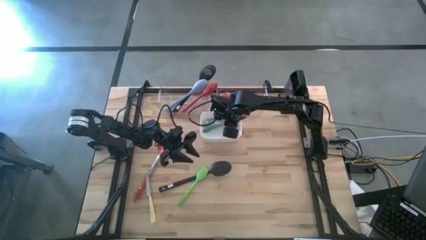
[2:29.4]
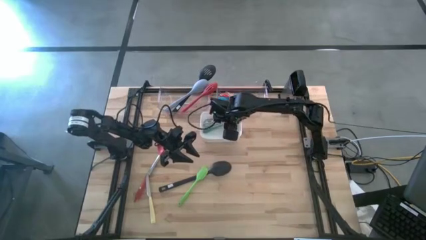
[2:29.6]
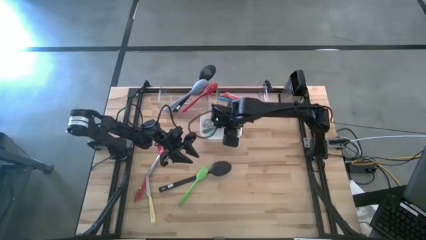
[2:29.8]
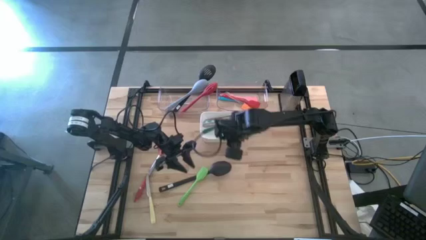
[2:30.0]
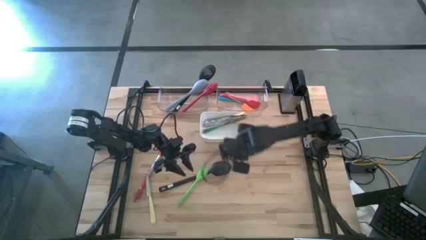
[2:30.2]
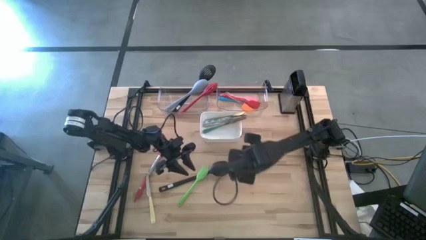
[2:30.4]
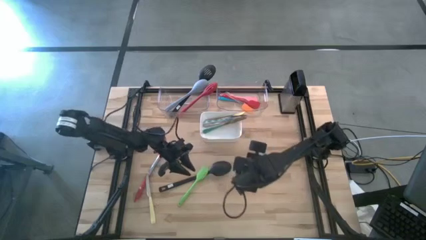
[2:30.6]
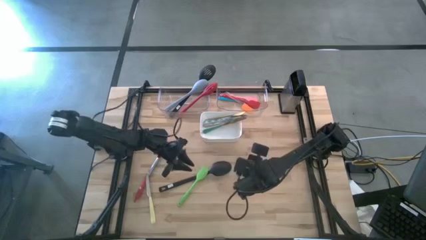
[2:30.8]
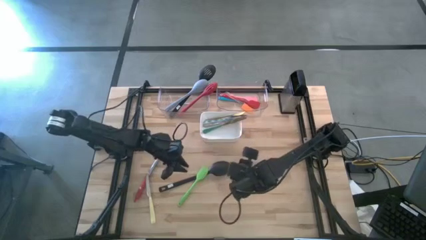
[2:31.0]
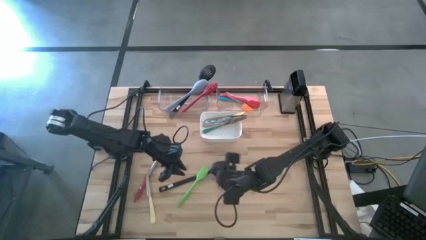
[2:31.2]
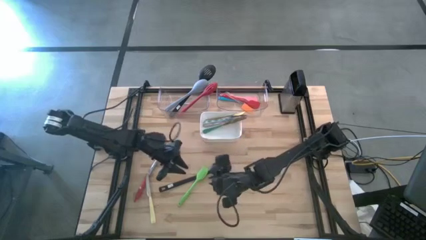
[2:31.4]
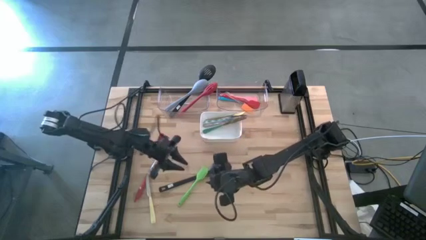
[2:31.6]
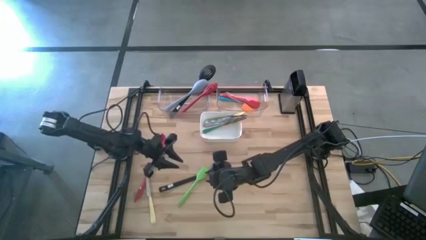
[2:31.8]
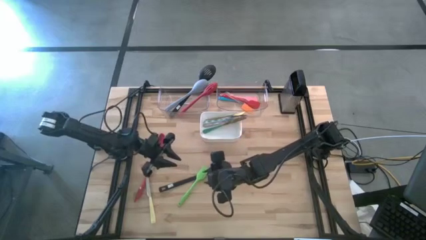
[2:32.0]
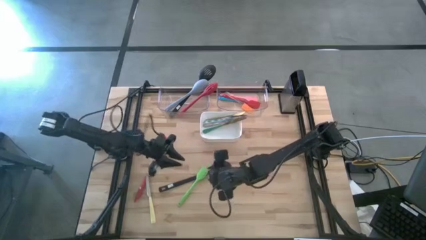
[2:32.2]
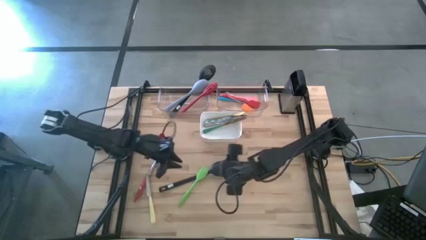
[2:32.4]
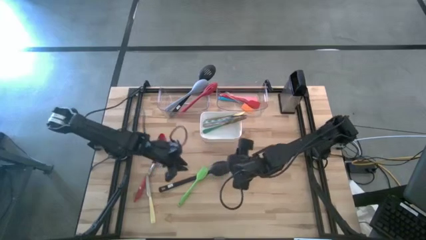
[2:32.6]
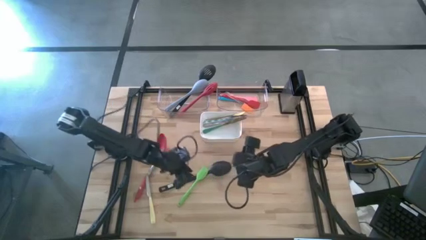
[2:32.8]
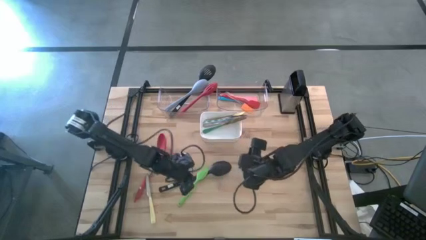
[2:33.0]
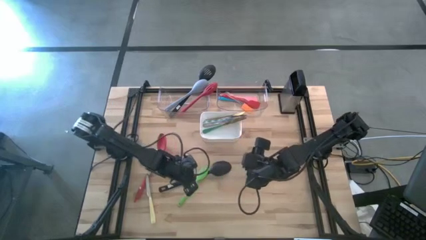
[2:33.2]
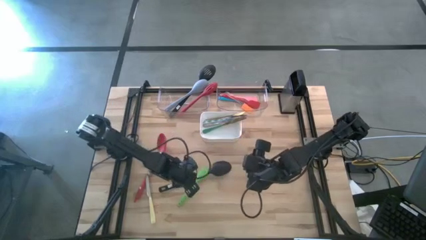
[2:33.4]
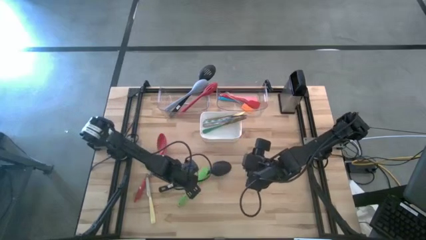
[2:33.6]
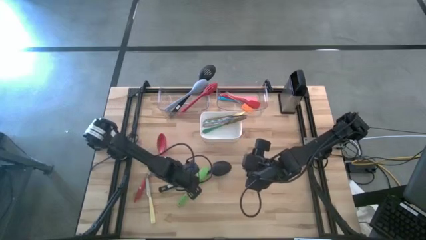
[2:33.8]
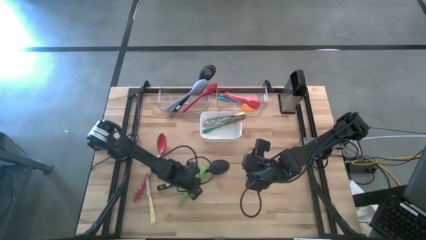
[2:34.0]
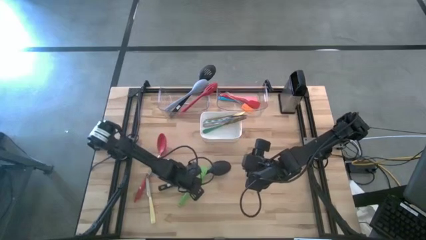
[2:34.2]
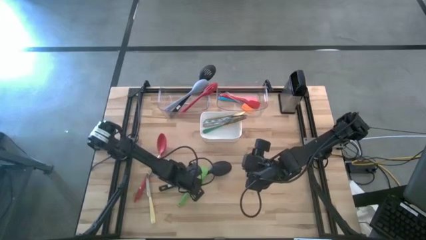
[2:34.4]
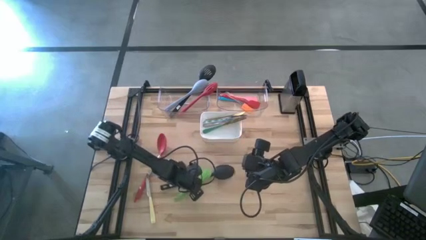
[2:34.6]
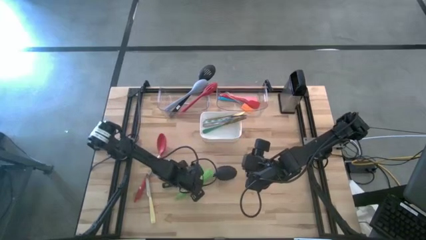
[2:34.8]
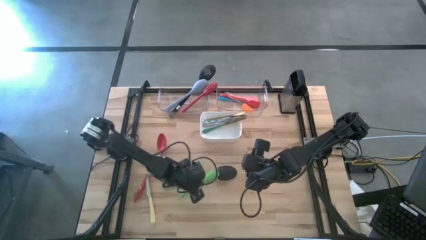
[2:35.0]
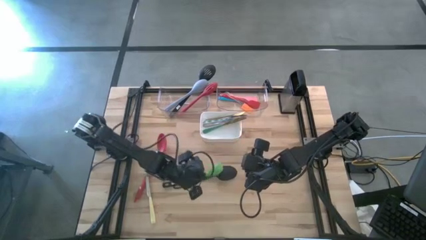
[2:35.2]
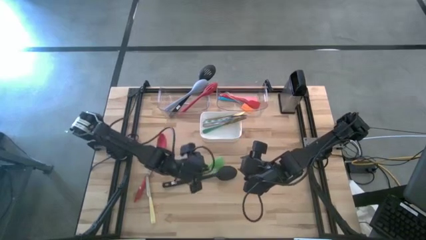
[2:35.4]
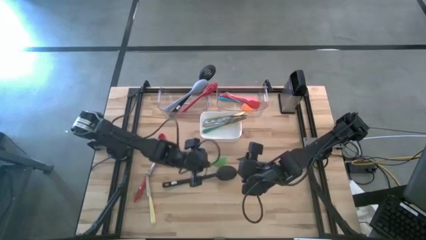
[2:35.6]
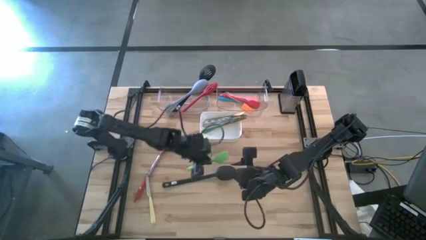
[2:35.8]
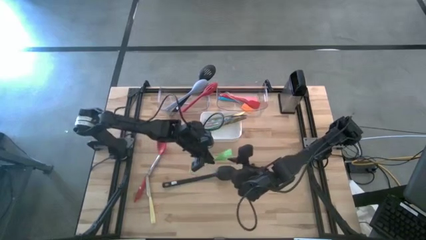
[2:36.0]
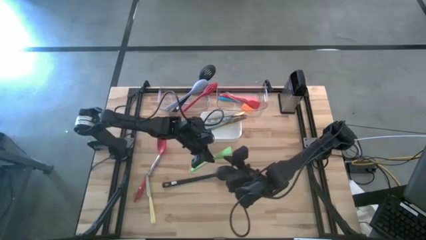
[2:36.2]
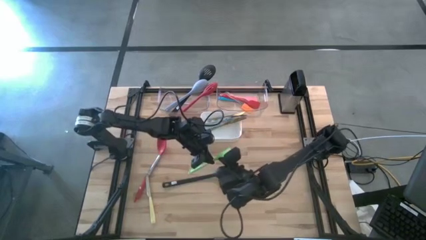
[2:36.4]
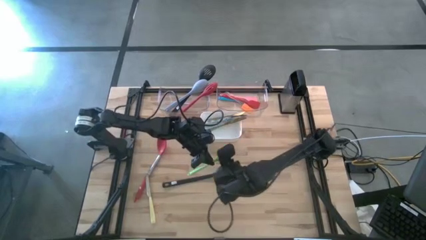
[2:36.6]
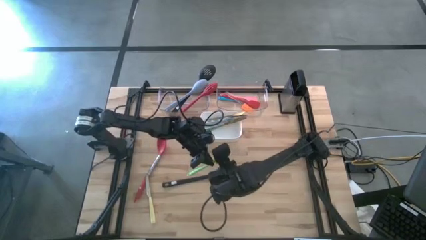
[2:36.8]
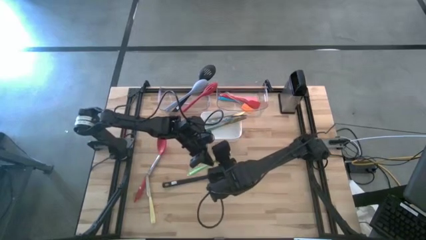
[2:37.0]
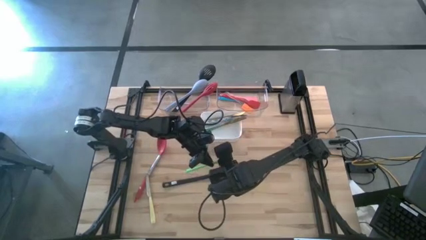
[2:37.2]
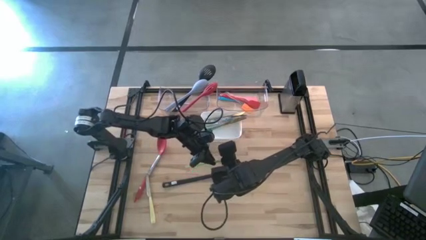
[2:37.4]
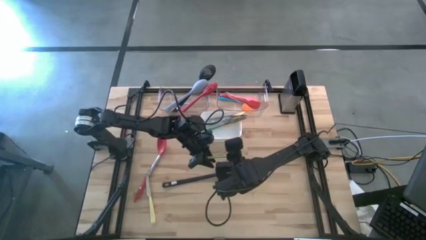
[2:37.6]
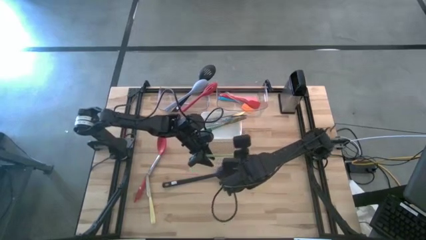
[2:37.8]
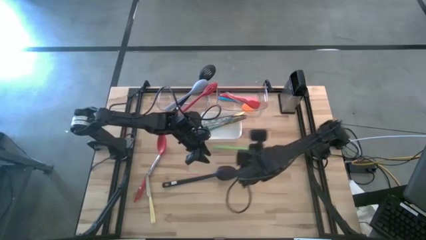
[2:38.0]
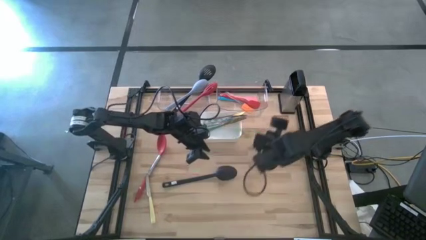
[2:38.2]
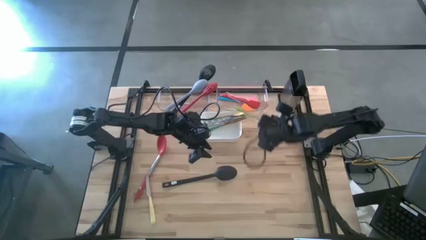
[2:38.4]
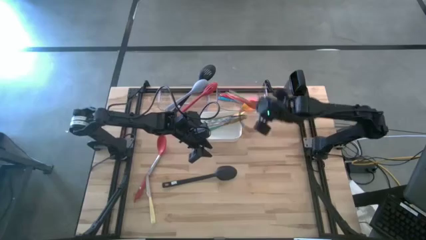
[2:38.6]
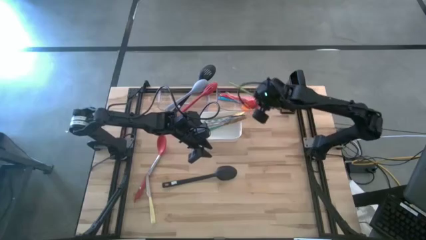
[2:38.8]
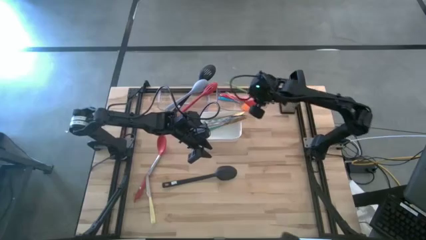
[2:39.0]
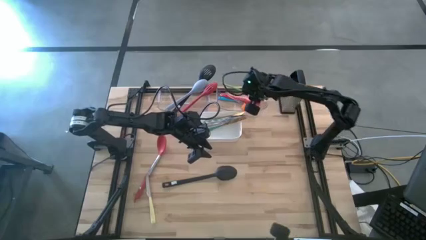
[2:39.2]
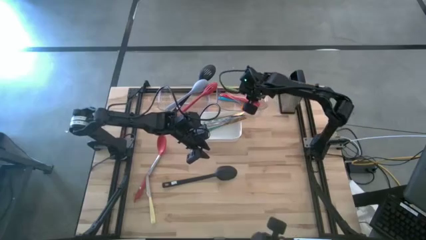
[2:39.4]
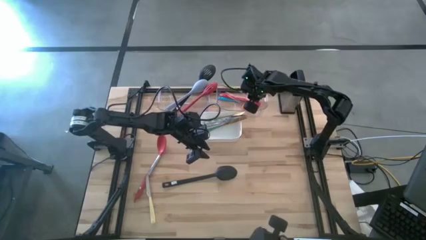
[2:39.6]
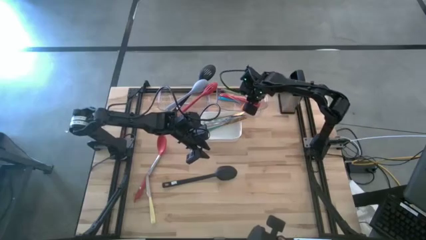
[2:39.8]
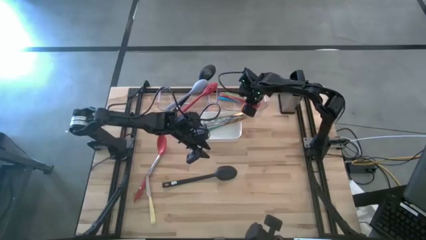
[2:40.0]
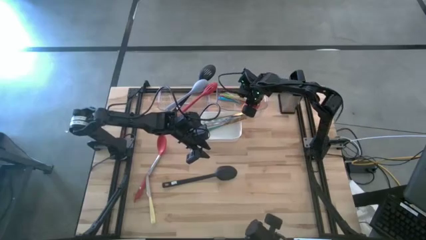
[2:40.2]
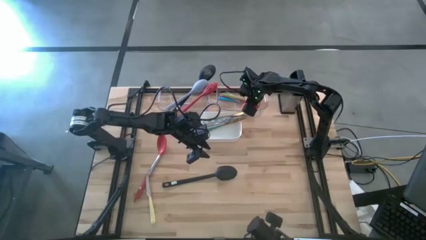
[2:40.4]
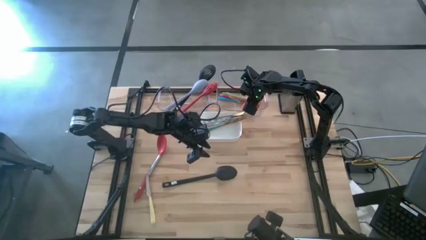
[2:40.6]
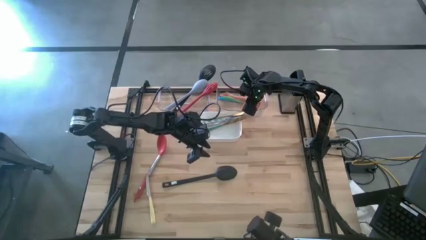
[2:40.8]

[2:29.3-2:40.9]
Task: Pick & Place Kitchen Items
Put the green spatula into the right transparent bin

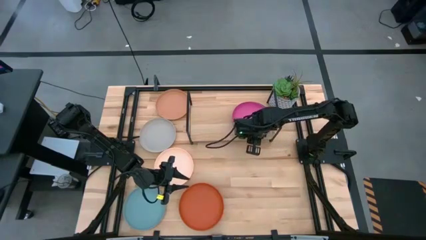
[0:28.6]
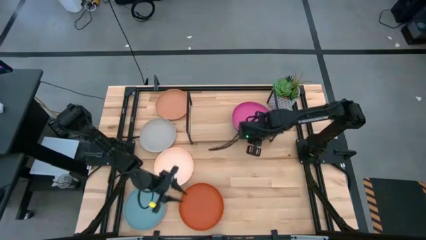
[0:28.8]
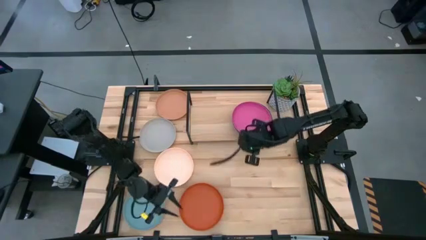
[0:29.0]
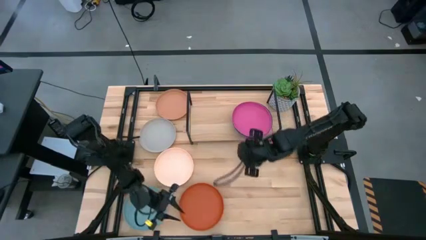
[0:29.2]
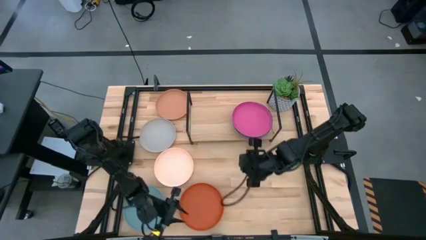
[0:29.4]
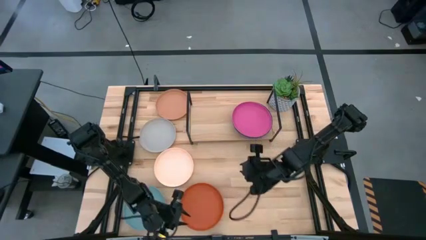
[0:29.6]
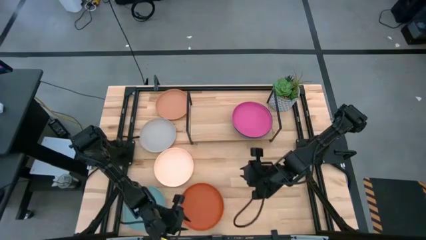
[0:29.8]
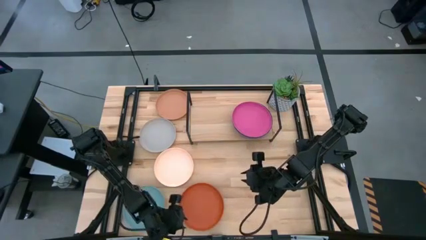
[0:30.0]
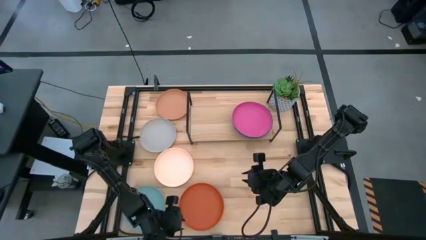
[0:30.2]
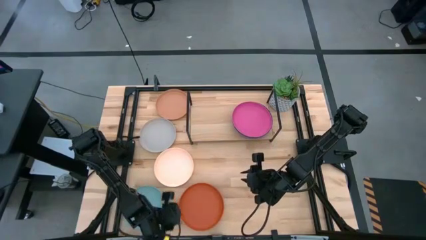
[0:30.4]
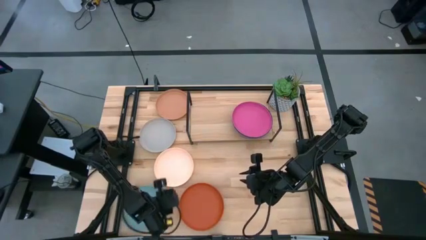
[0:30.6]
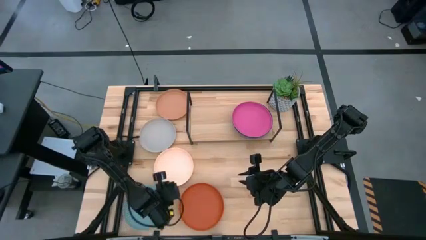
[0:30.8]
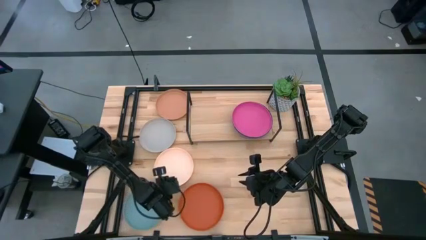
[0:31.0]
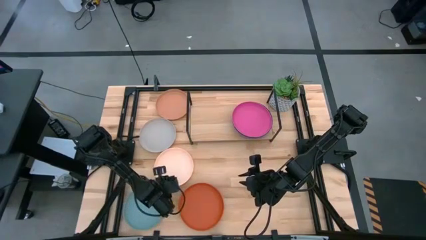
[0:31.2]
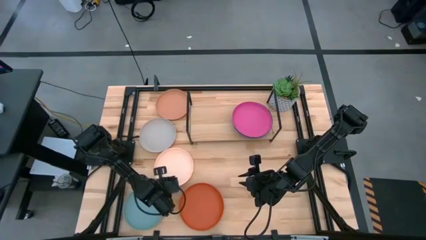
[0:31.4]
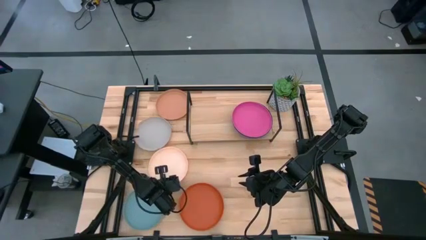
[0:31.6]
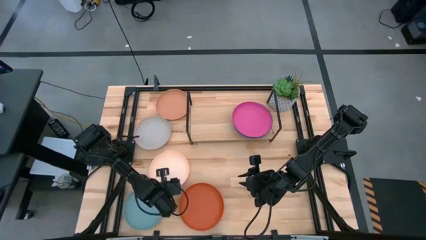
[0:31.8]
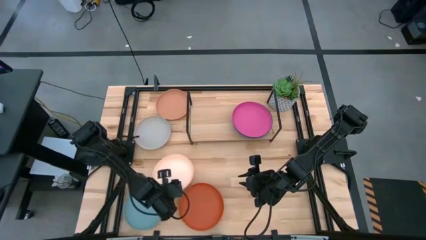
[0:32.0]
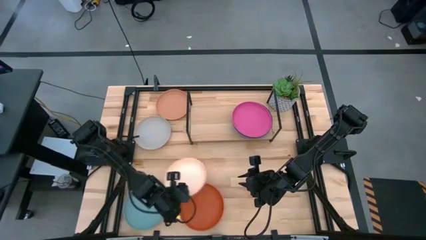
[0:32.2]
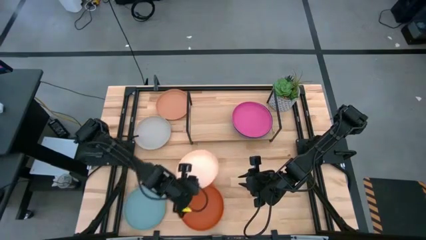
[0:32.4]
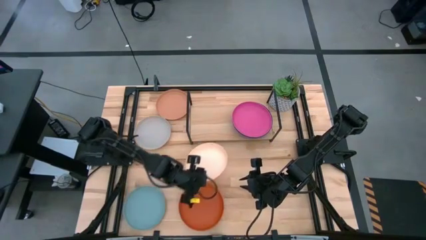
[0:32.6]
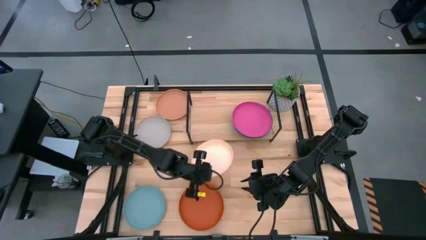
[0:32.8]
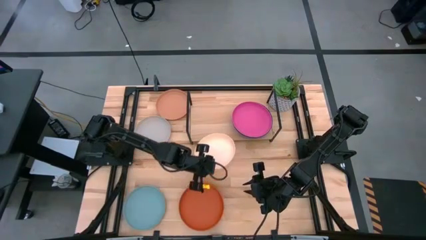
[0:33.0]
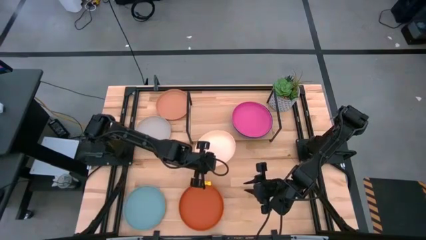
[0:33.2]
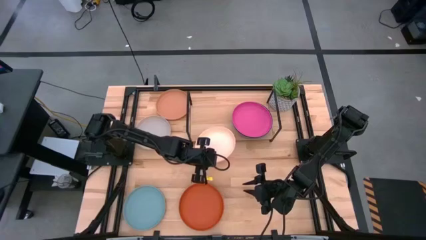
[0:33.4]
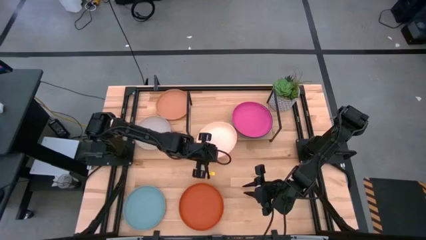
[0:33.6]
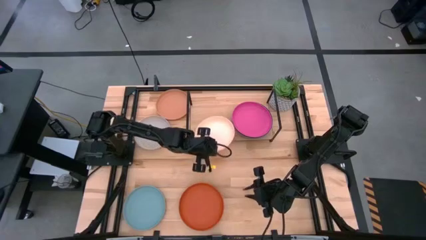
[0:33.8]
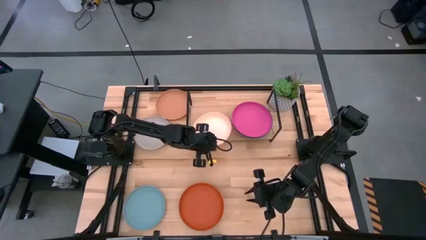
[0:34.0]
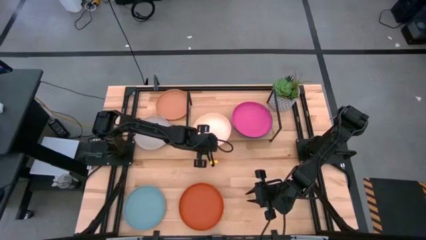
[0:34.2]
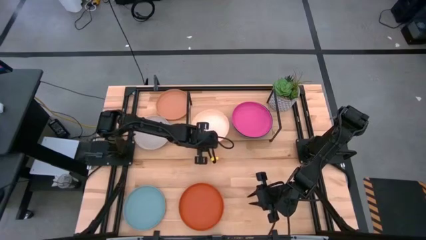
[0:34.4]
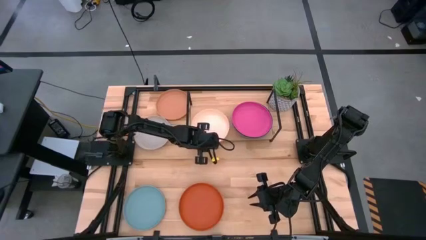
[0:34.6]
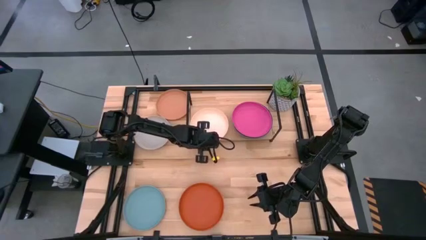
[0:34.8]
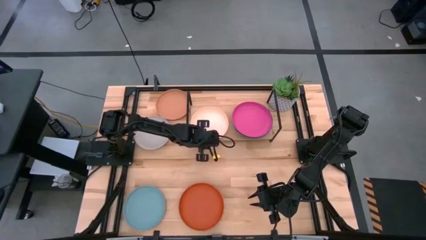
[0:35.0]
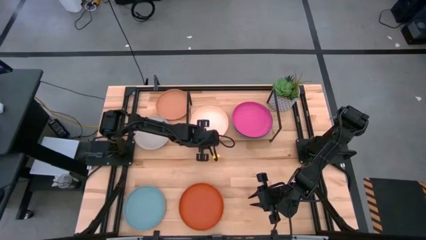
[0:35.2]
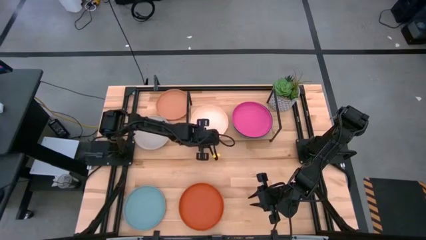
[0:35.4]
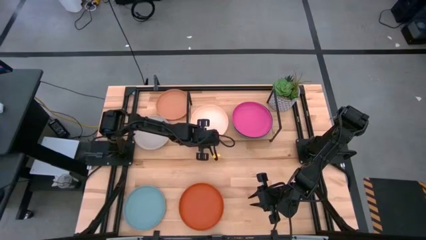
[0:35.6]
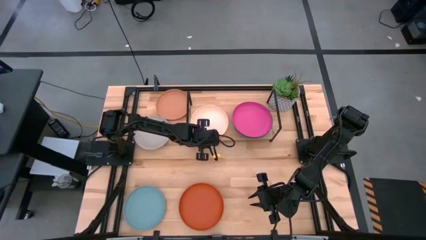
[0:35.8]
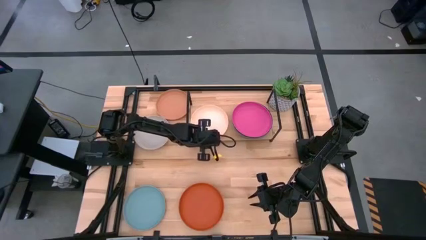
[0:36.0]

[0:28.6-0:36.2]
Task: Place and stack plates onto a shelf
Put the light orange plate on the shelf
